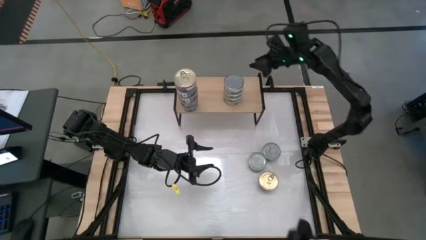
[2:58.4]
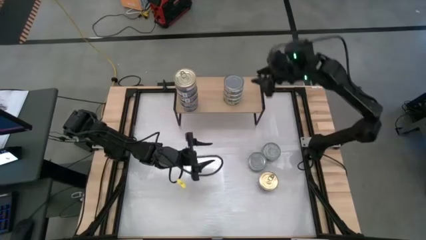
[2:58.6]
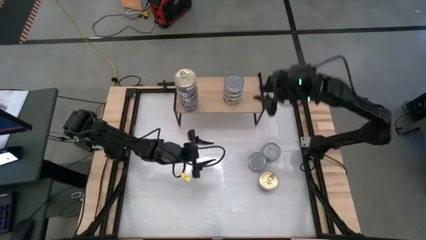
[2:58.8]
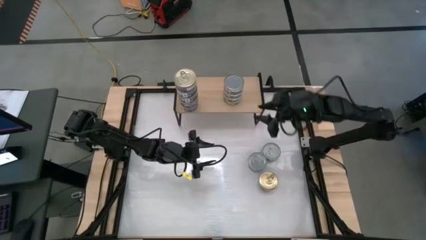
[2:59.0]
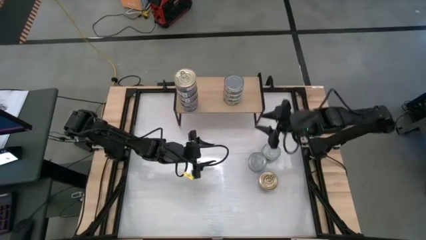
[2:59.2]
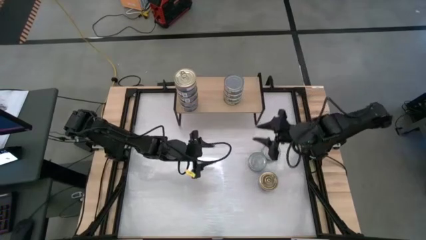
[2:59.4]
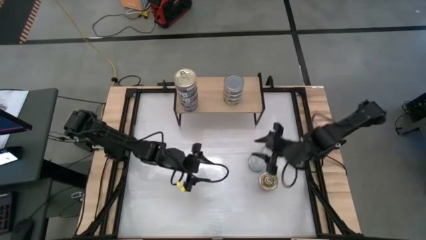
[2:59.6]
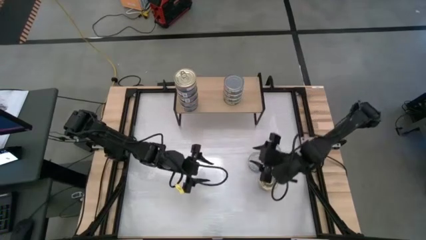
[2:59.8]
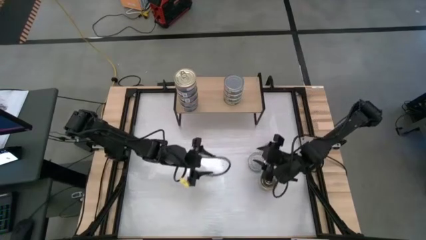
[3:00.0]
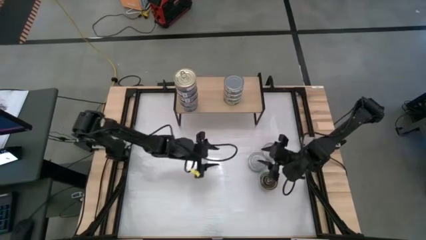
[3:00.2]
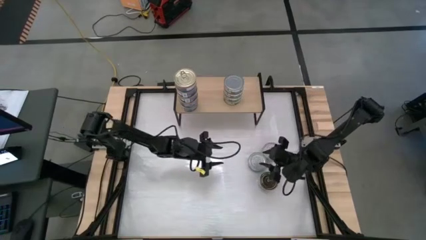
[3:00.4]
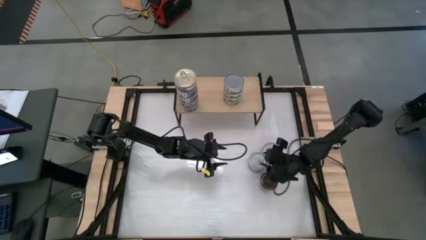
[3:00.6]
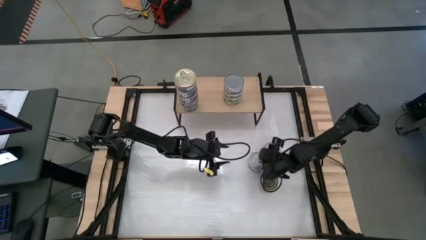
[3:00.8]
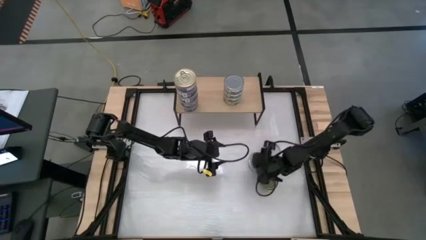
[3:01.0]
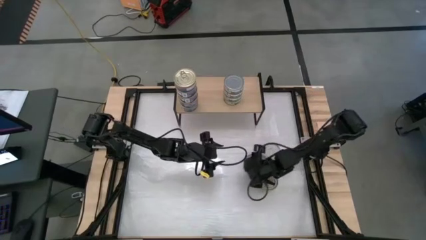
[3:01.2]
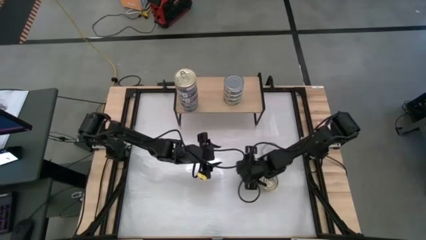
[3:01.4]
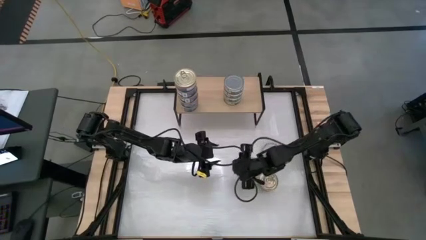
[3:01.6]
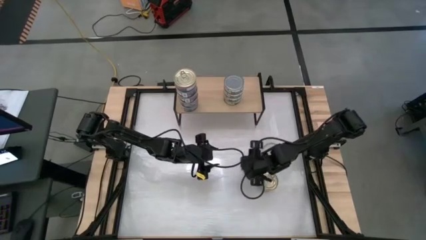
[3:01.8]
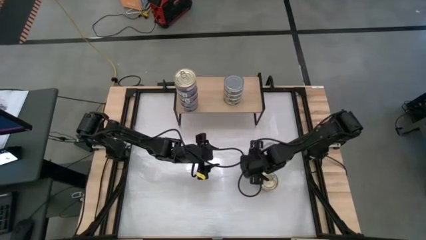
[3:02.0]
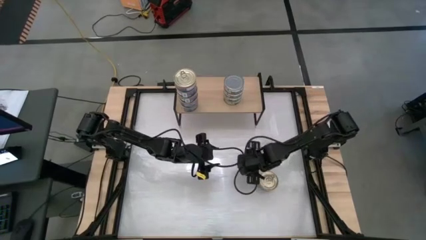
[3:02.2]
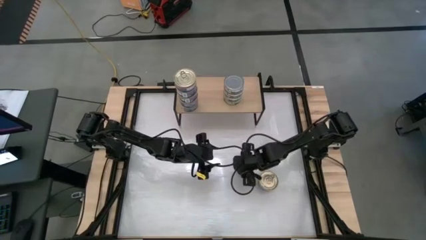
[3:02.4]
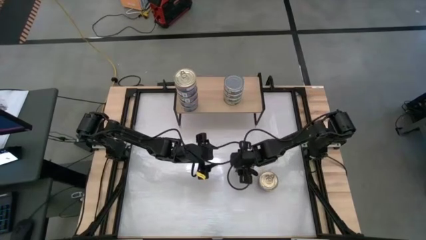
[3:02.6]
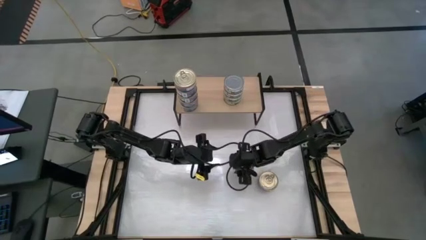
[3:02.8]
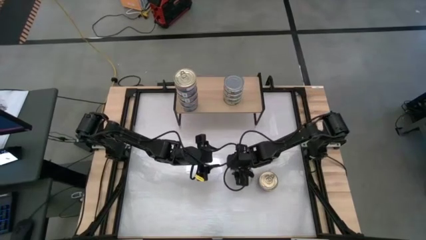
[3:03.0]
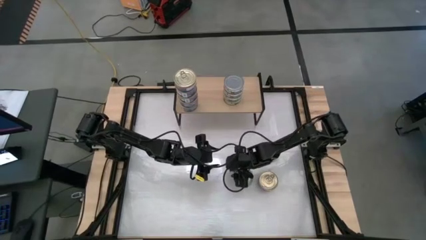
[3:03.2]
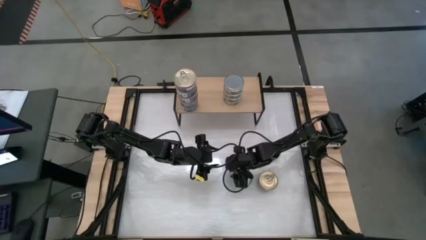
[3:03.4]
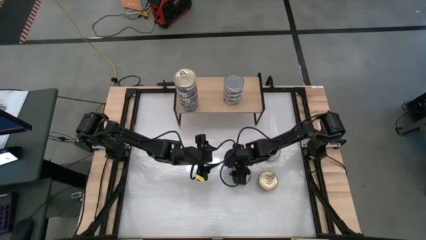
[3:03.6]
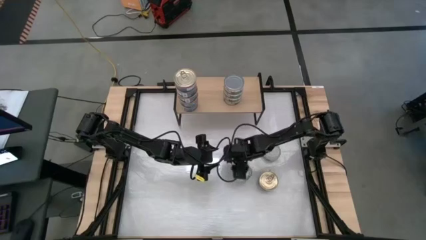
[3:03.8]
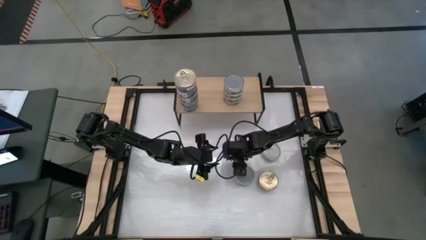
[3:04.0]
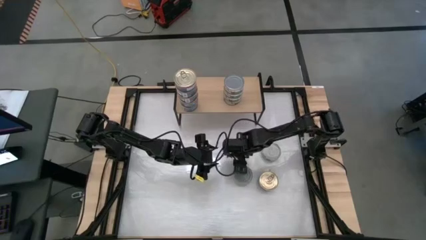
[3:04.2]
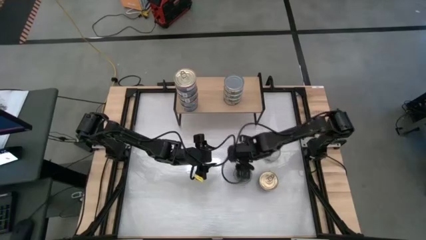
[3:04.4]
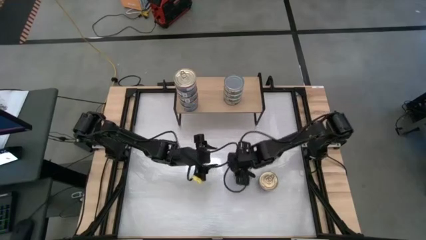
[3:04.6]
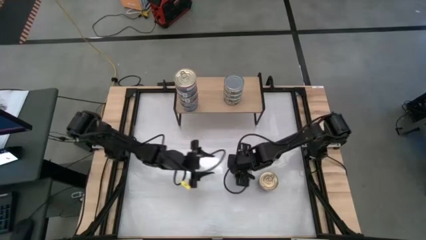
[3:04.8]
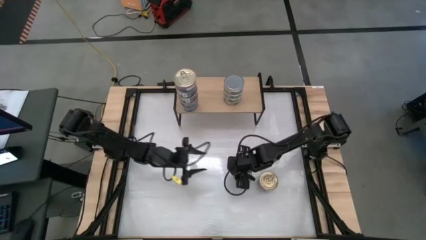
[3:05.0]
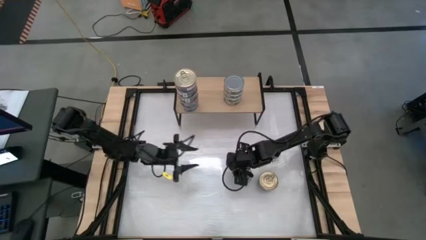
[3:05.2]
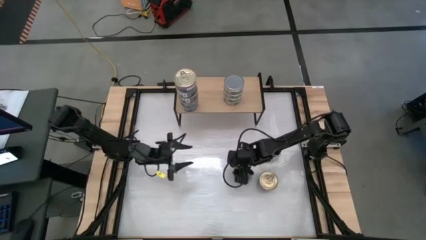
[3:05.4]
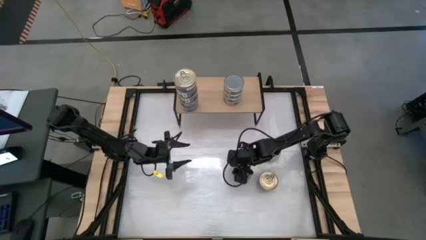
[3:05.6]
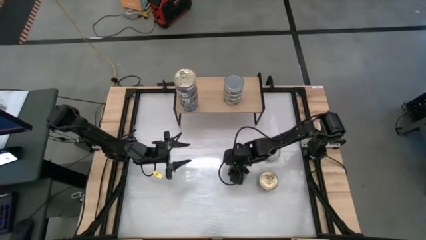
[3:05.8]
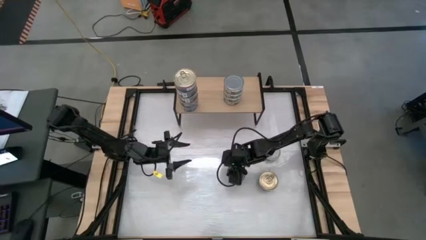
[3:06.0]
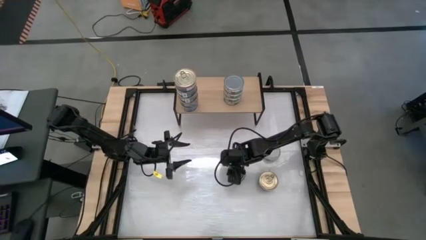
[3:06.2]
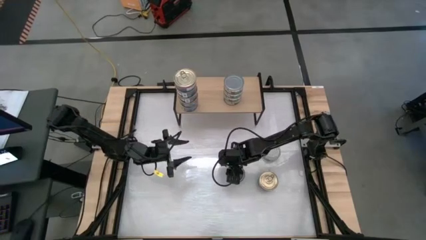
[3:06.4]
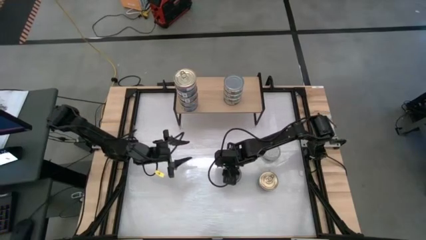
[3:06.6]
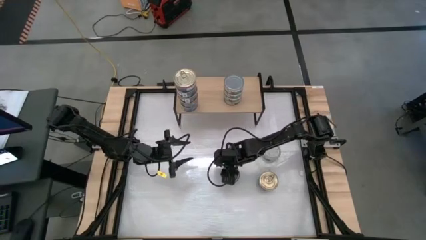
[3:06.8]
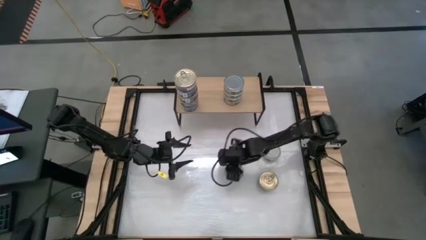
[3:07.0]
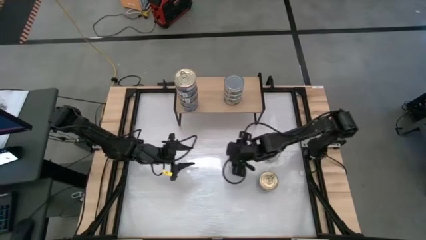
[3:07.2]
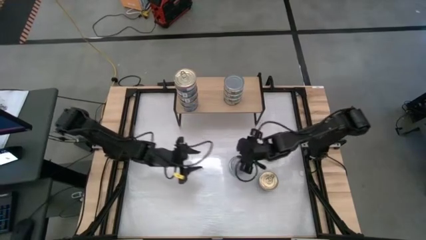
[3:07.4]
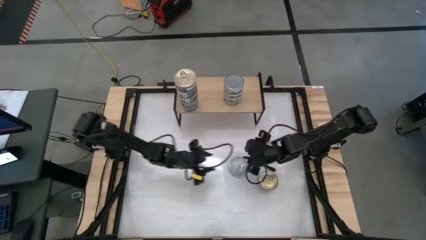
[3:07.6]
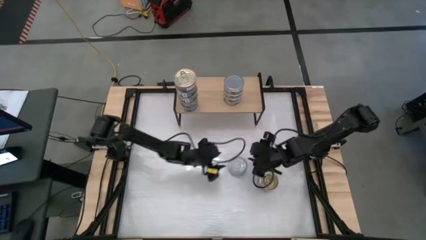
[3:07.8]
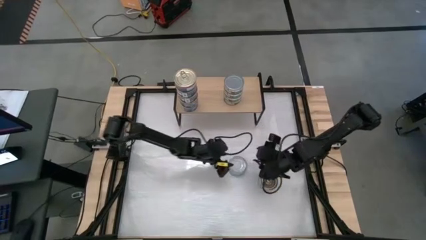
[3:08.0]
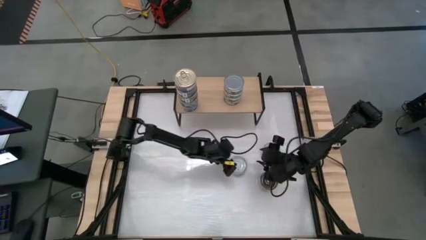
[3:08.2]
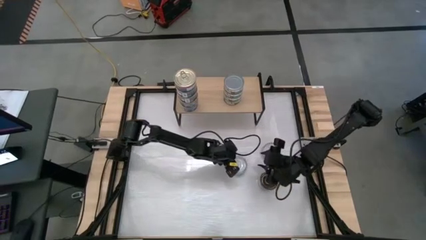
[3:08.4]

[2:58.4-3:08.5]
Task: Stack canned seafood by type on shelf
Stack the green tuna can on top of the other green tuna cans on the shelf

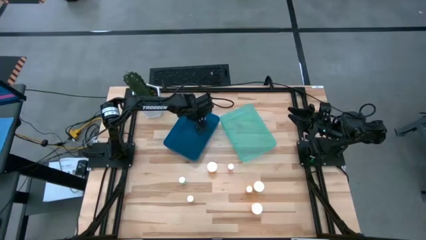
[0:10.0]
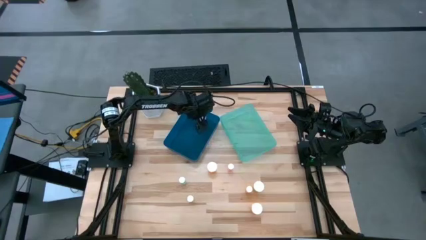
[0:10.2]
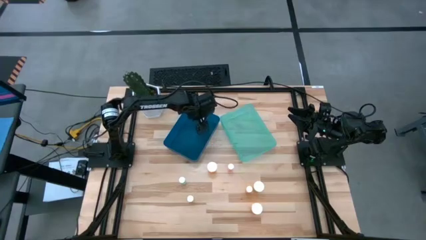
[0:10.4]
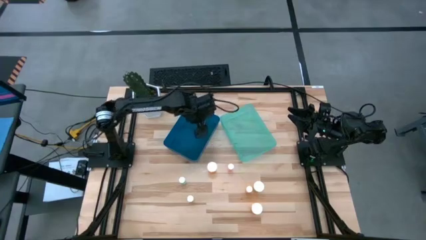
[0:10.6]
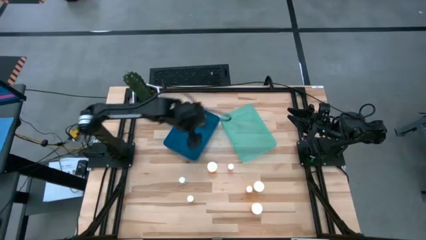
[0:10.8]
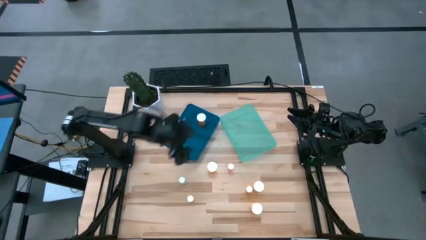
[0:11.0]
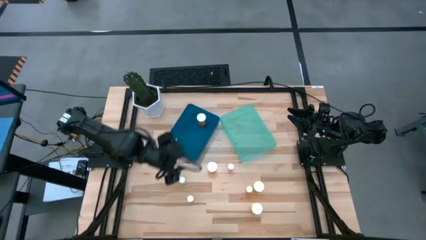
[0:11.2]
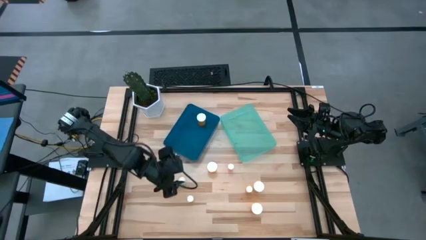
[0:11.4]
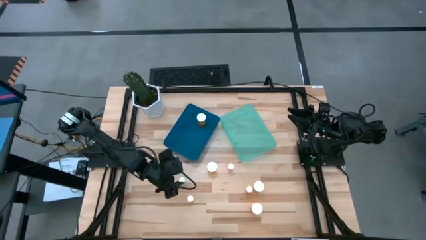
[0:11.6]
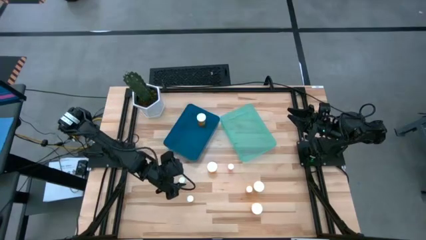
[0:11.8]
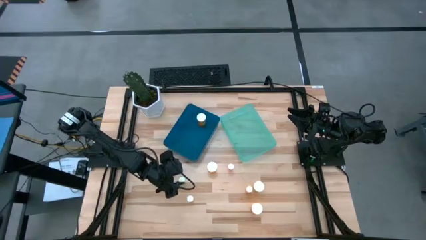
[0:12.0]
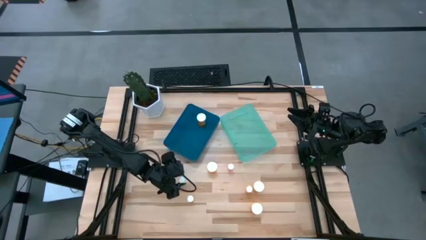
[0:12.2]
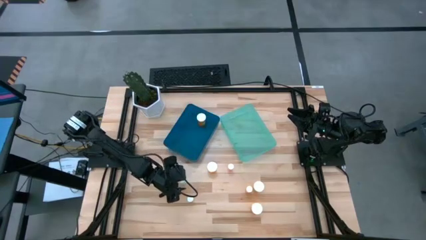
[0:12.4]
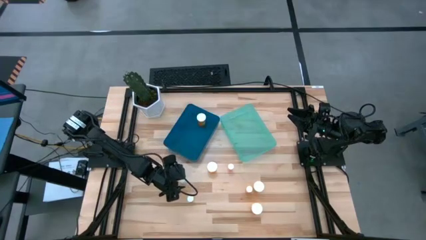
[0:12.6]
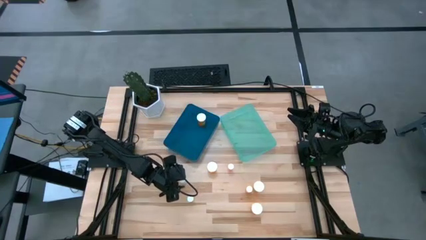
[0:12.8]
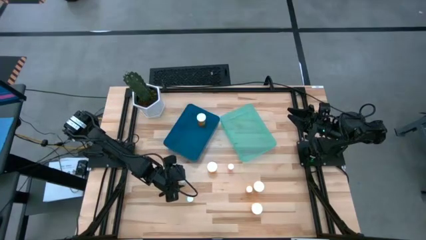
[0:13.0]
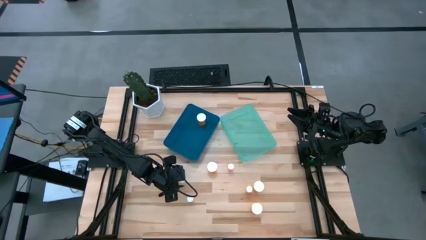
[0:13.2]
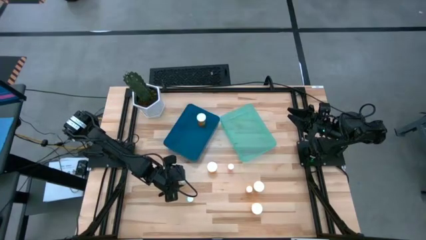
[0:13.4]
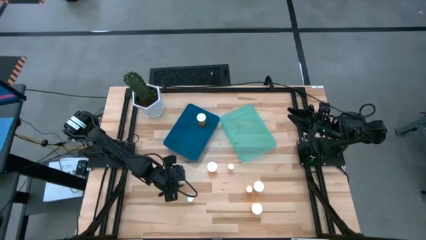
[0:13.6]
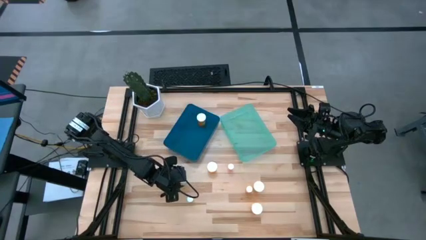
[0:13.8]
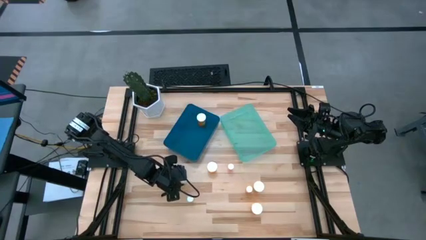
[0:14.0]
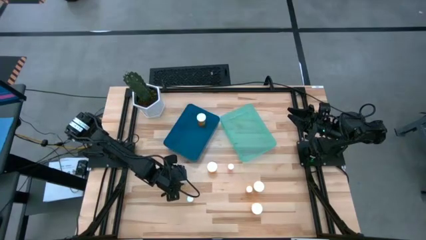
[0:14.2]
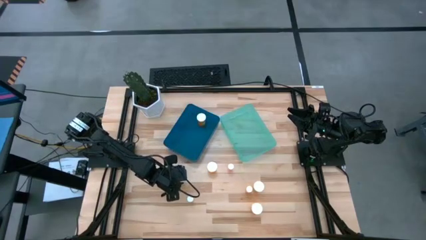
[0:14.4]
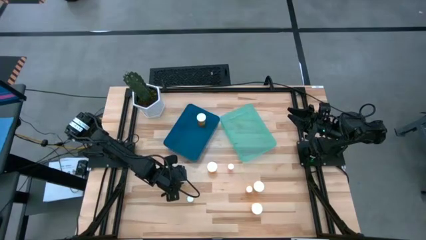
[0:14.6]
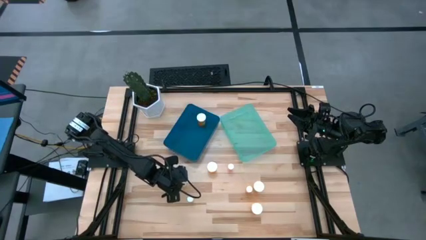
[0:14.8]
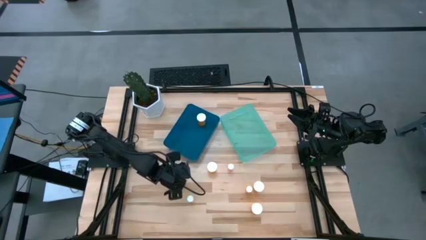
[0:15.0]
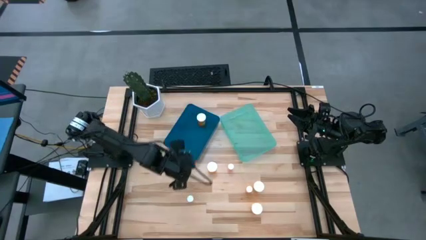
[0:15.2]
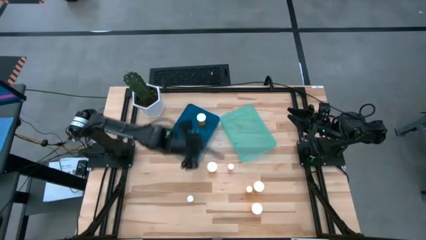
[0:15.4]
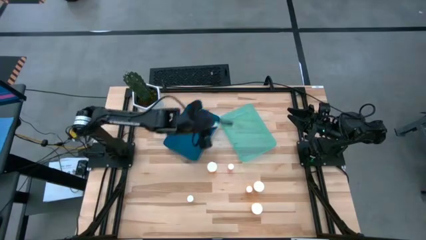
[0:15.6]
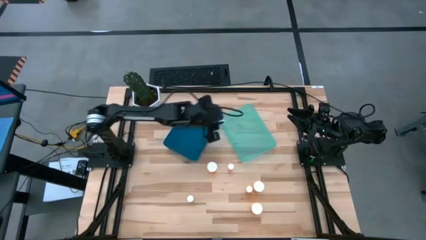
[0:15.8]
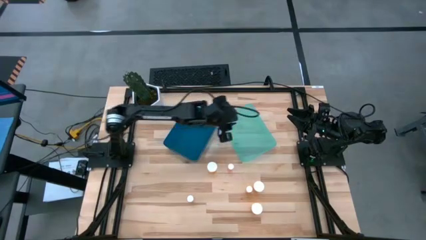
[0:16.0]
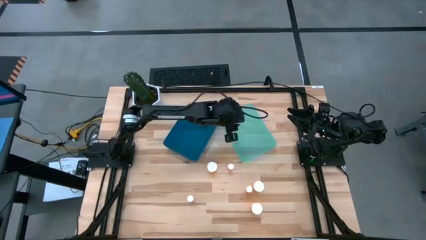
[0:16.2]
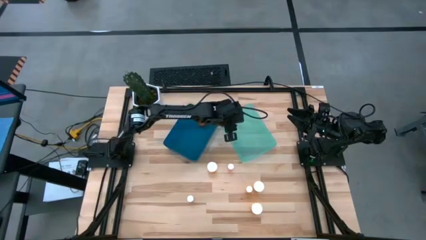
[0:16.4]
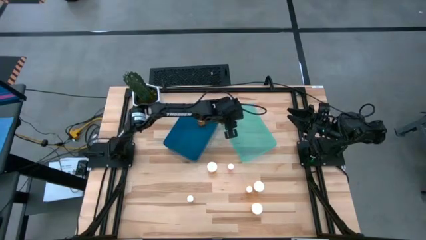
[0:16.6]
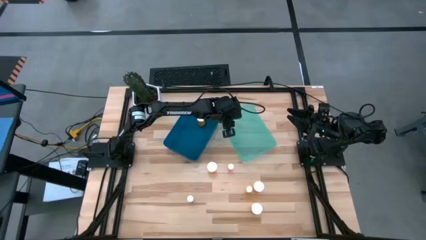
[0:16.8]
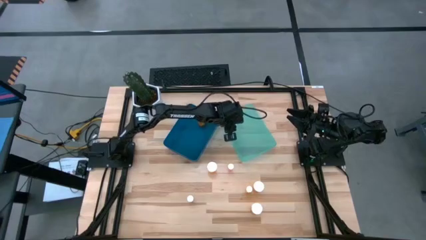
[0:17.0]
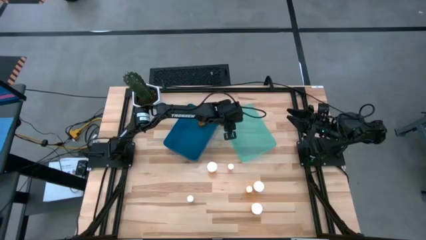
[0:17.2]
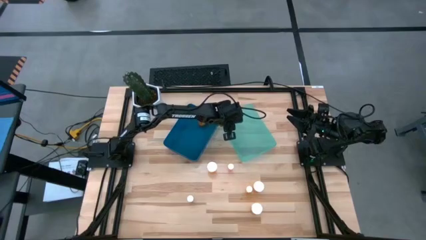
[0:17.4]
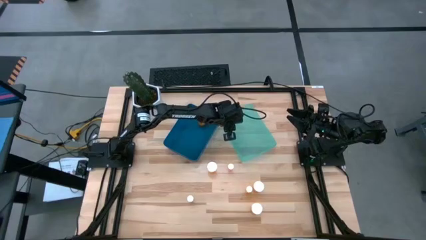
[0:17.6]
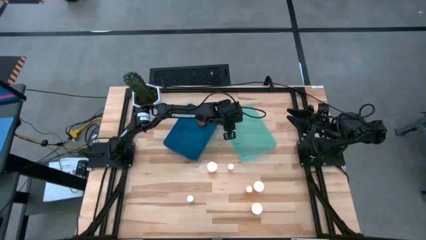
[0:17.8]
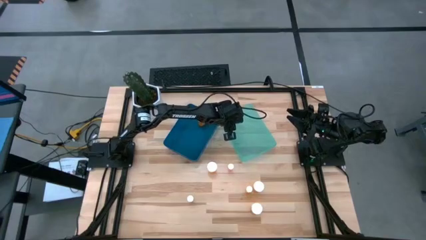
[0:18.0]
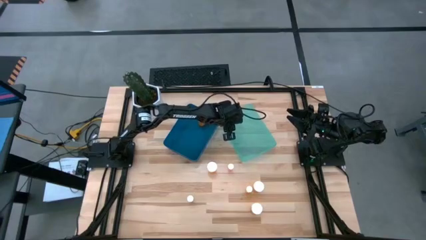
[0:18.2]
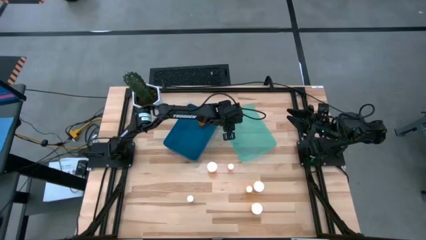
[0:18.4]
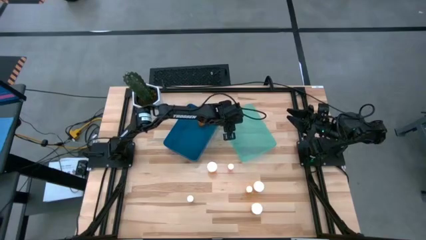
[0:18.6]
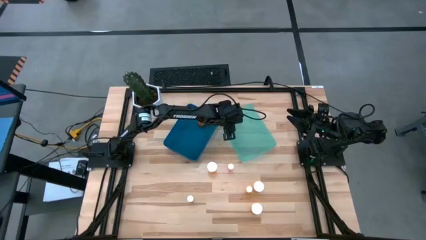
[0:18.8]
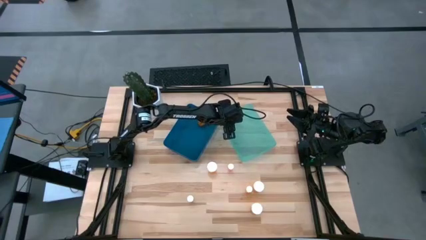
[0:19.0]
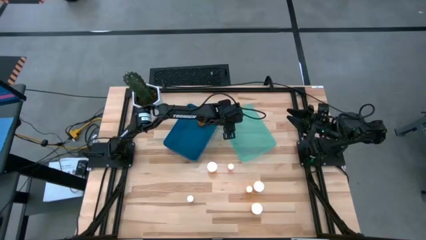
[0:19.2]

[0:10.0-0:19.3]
Task: Pick and place medicine bottles into bin by pill shape (circle, oval)
Put the blue pill bottle into the green bin
